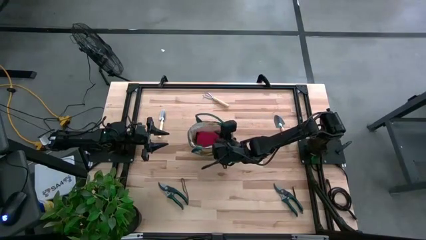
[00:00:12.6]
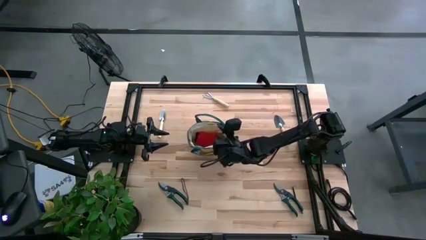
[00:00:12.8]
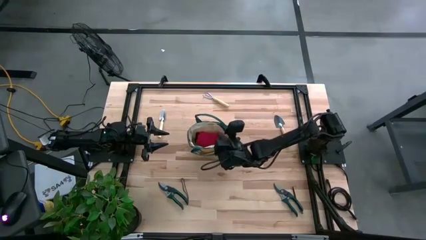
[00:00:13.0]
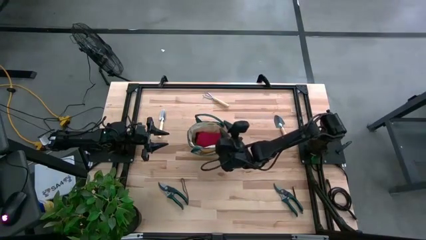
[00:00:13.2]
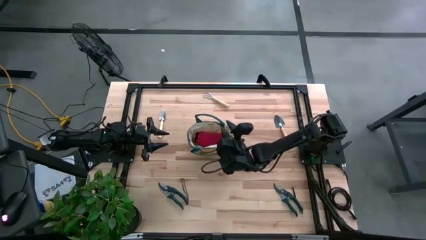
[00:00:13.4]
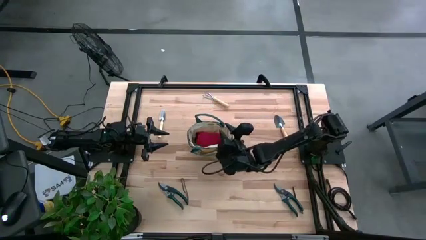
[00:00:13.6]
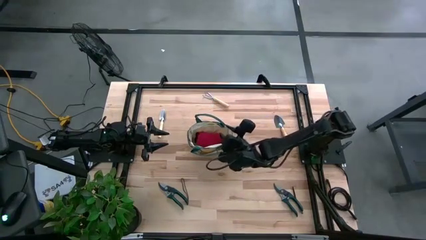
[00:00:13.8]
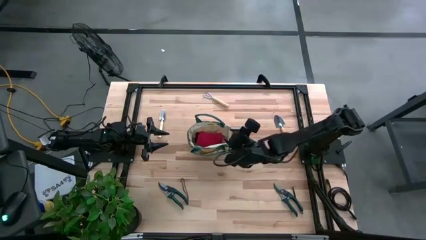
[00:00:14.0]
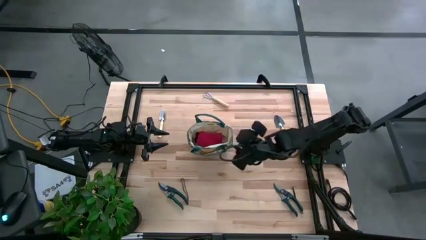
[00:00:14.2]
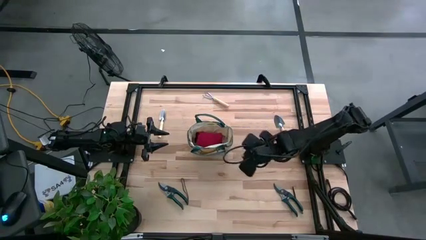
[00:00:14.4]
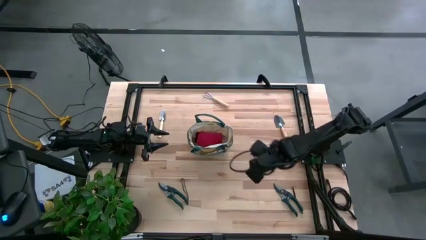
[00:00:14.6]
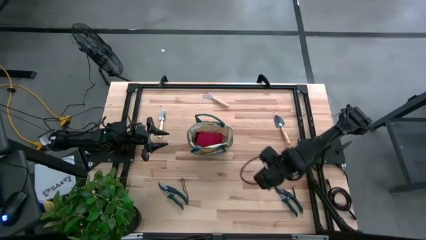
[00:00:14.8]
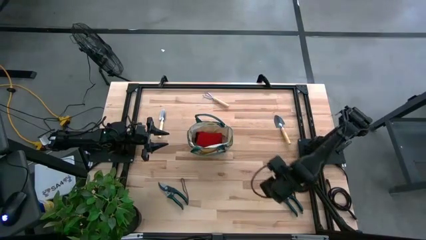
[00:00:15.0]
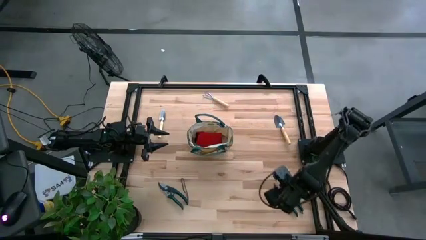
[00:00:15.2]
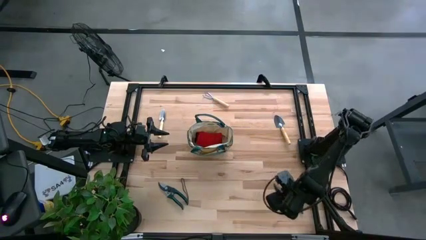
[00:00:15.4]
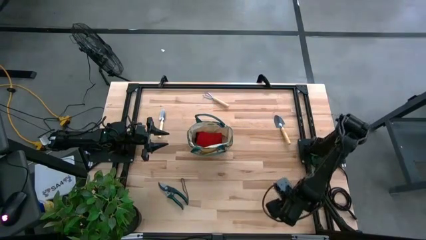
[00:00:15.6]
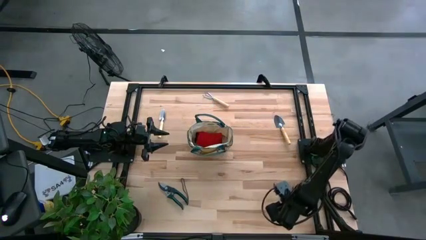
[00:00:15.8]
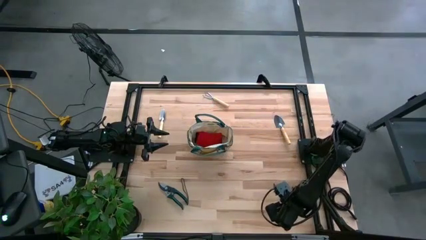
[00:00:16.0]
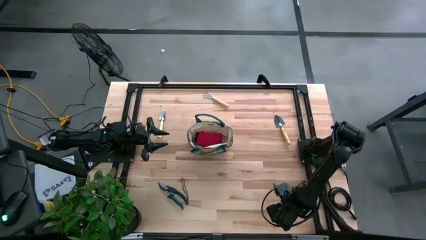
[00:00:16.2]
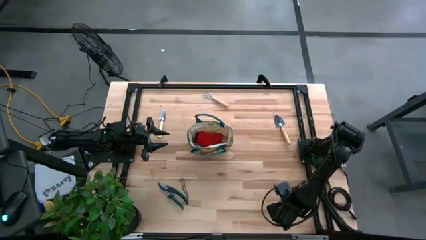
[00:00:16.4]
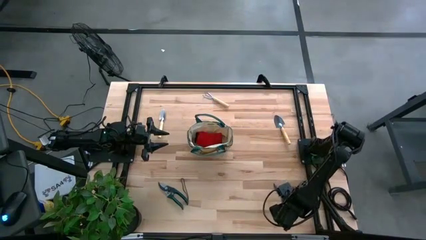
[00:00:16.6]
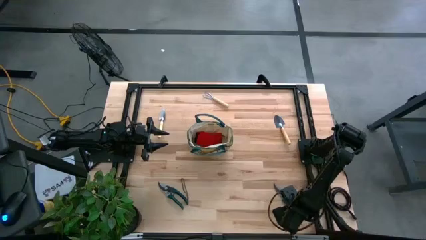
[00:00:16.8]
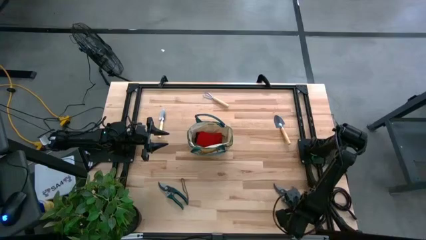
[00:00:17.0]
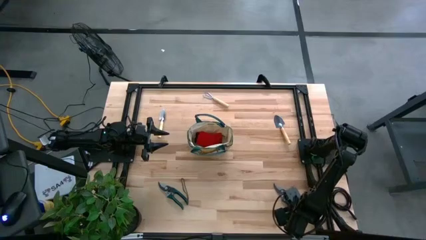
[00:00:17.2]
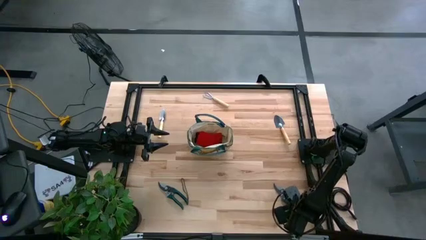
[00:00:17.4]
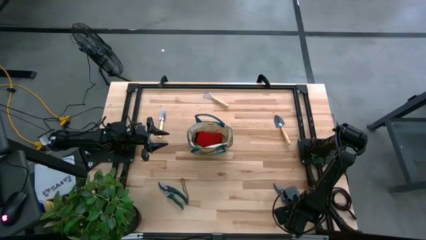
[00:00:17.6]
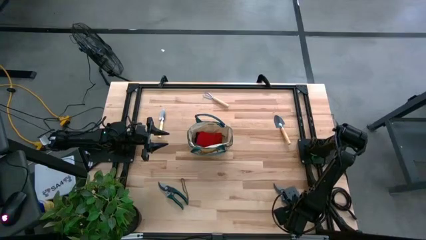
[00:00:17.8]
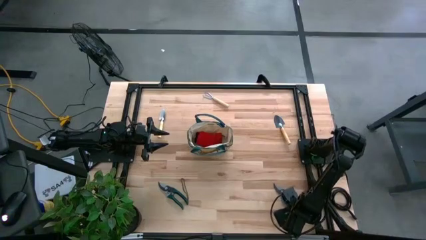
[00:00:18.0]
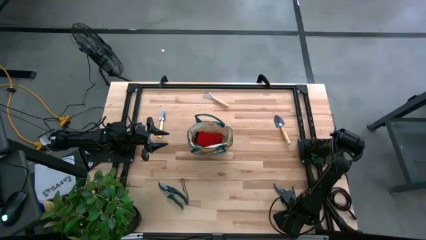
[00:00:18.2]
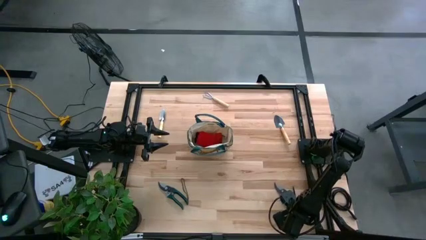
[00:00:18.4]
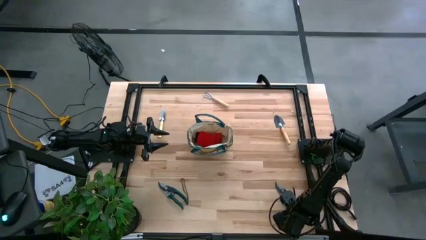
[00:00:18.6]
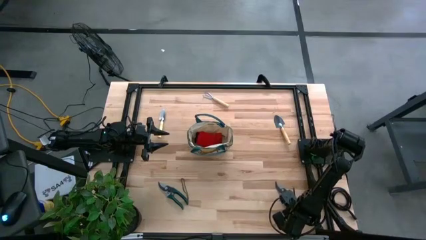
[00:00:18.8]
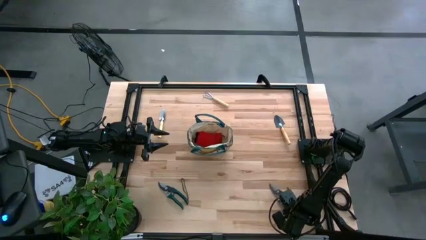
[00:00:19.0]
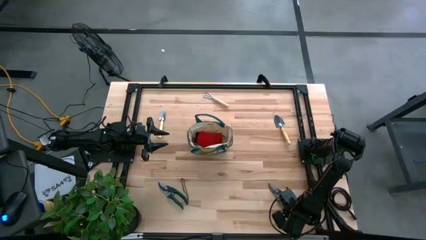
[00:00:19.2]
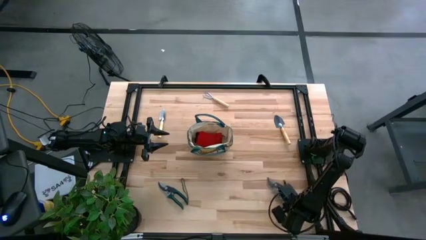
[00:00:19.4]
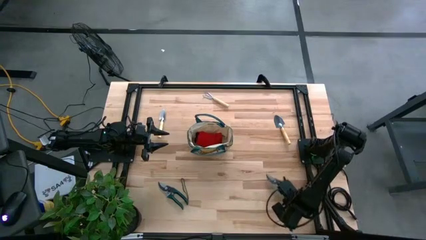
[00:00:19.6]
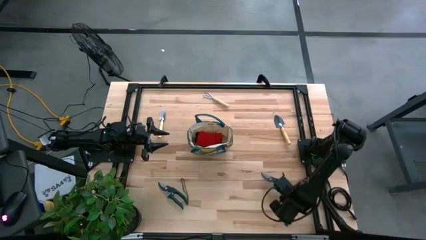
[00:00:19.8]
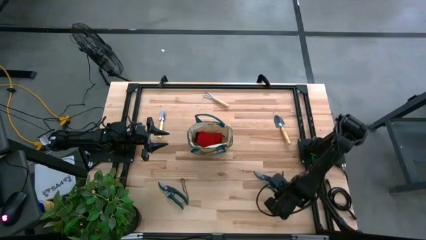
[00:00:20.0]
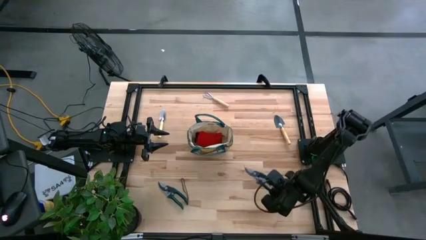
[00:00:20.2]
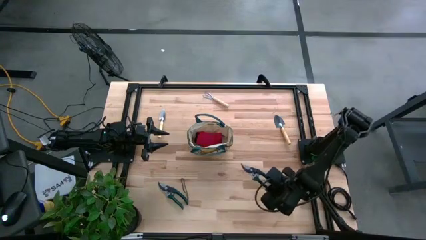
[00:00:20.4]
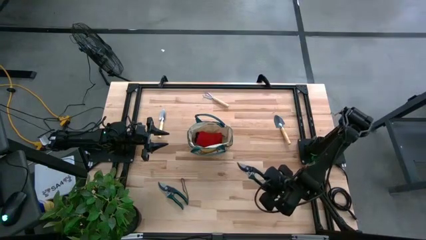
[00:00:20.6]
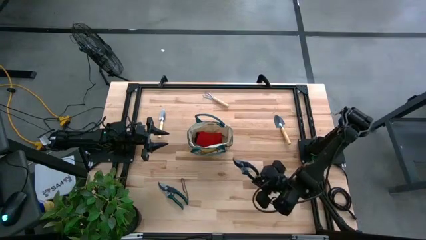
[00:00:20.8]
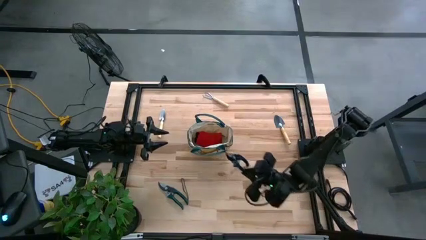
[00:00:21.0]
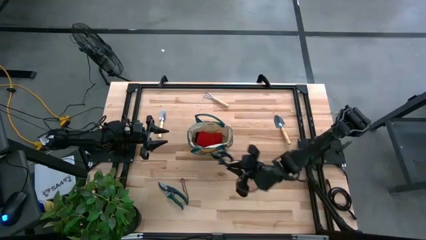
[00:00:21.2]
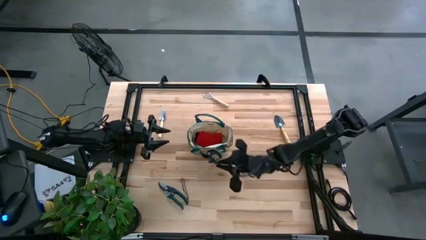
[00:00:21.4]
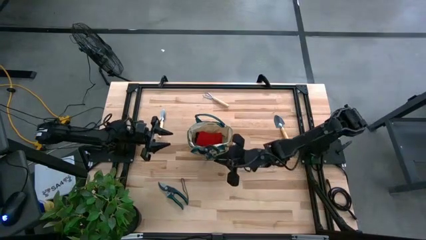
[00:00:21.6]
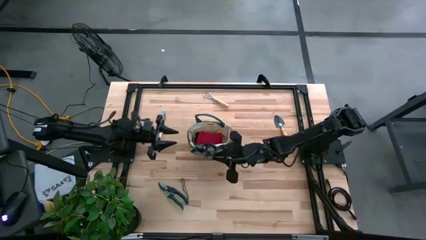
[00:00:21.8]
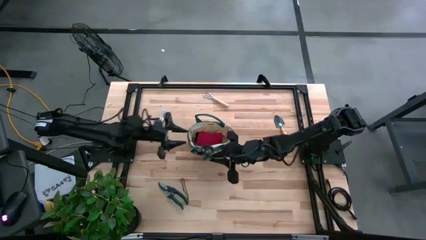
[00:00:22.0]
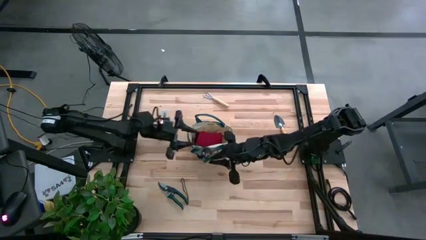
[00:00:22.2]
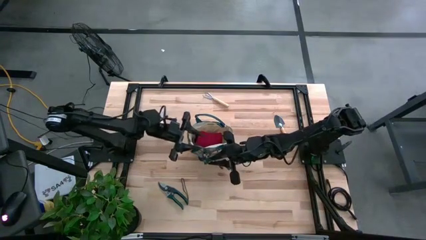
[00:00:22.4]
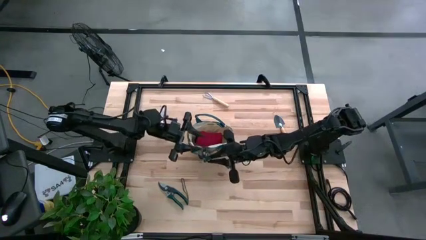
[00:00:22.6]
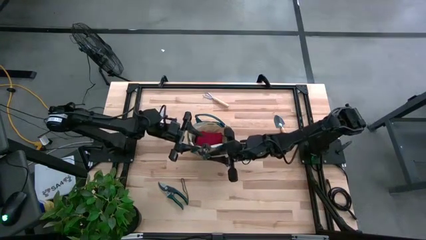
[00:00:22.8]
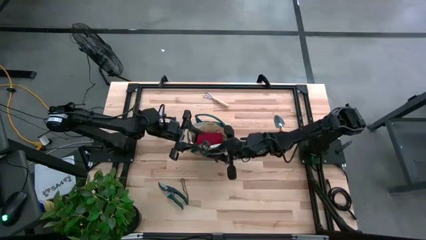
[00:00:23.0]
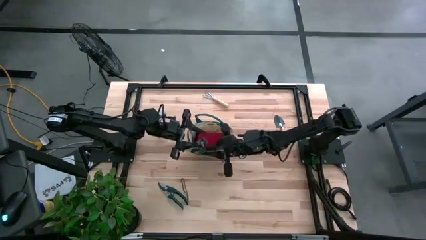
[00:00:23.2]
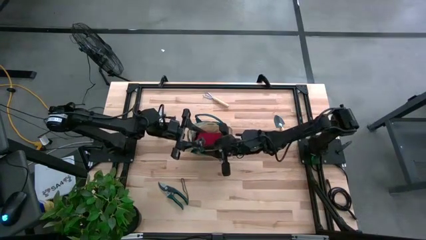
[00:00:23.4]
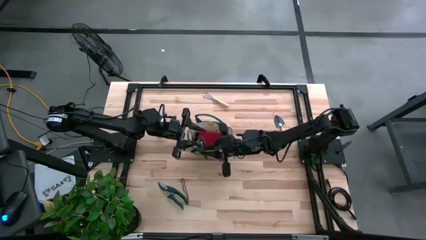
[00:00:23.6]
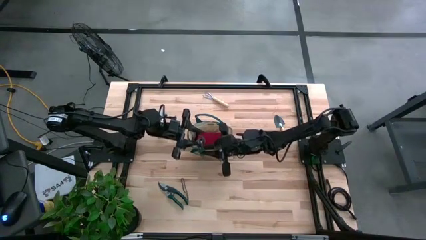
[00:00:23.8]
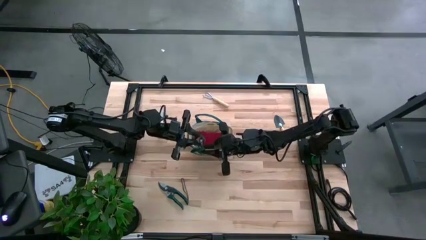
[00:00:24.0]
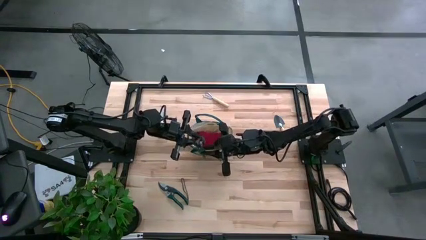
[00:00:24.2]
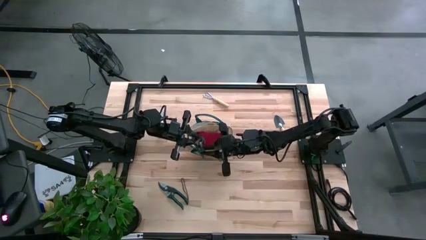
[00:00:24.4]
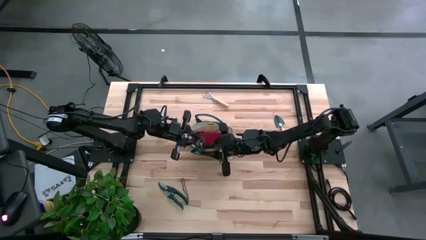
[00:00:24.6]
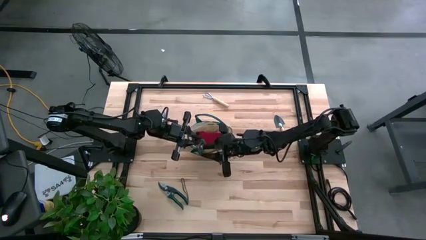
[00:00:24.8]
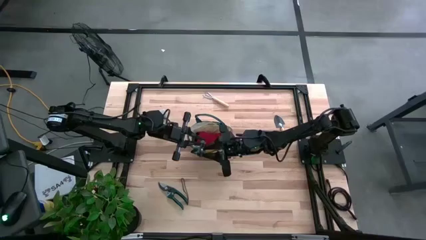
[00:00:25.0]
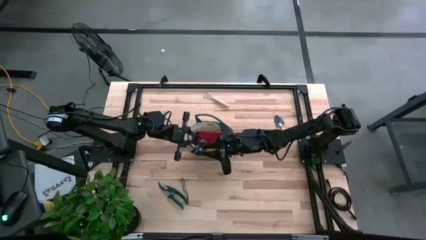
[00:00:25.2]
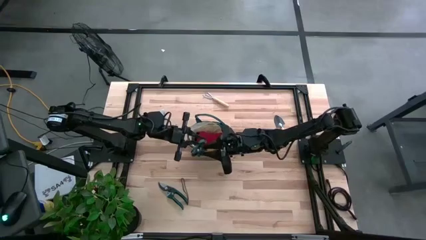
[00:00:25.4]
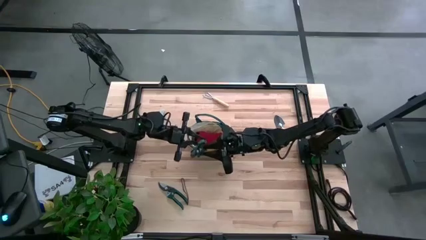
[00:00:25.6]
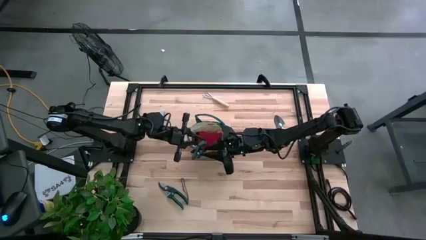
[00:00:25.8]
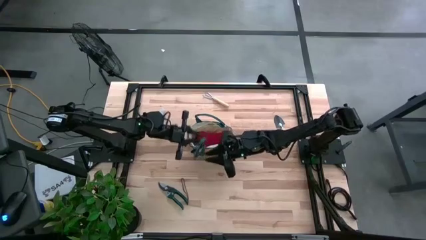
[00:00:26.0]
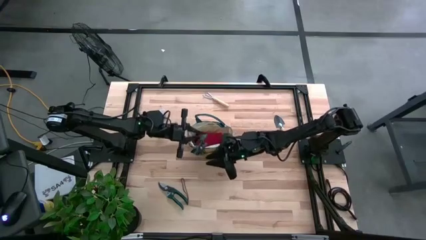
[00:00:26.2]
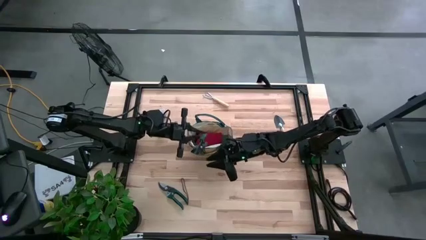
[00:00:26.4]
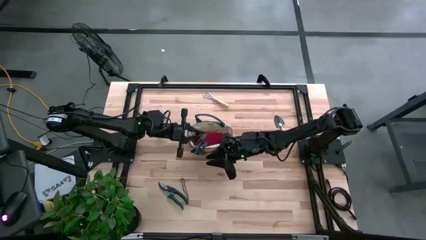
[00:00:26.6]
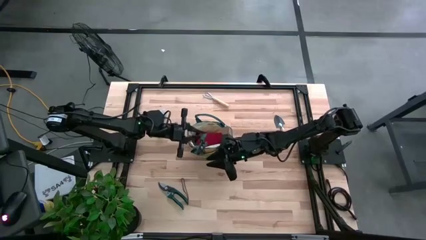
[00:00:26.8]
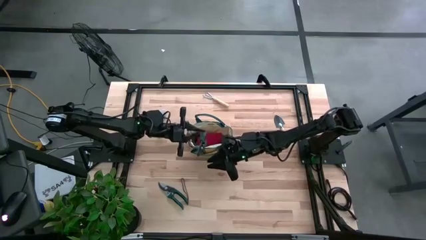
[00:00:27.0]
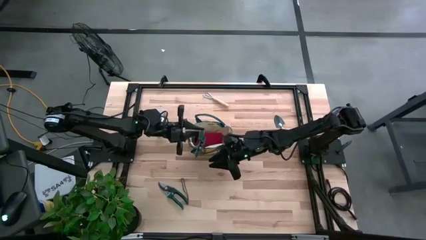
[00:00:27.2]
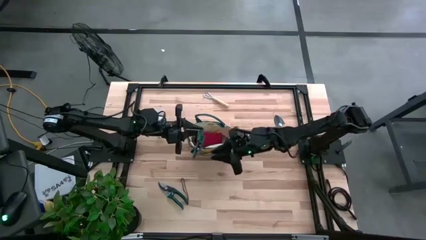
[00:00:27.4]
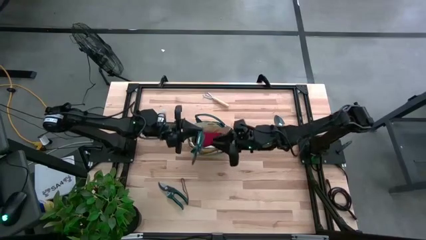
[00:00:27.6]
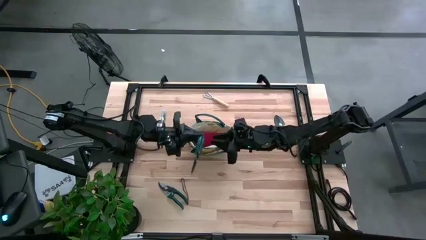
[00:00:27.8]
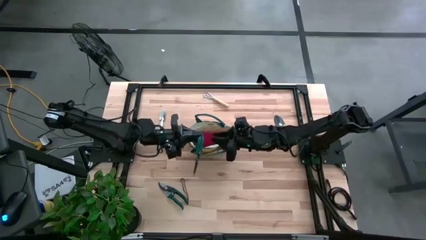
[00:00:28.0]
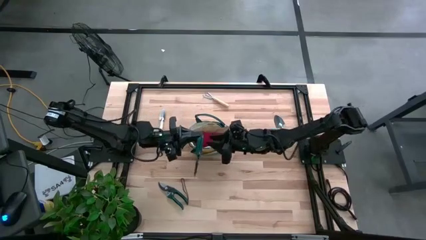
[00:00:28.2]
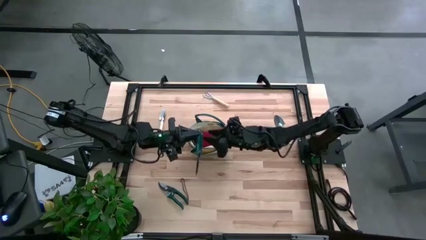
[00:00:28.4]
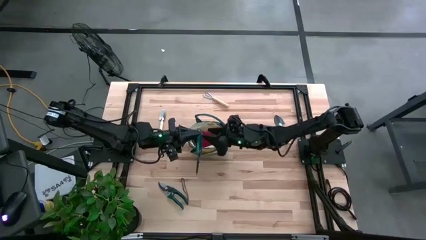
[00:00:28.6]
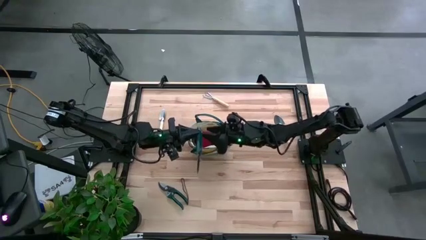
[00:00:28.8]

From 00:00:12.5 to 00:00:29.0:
Task: Pick & Place Garden tools in Gardening bag
Put the right green shear scissors into the light brown gardening bag
